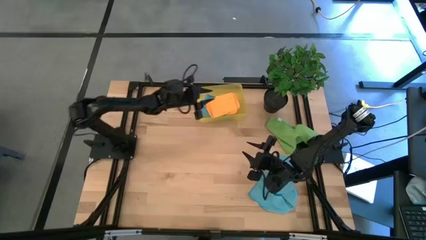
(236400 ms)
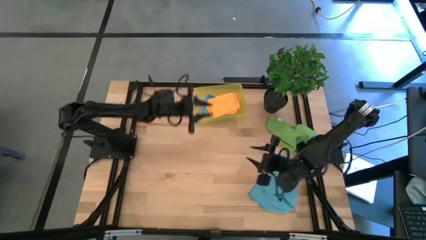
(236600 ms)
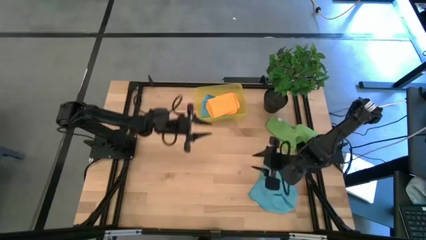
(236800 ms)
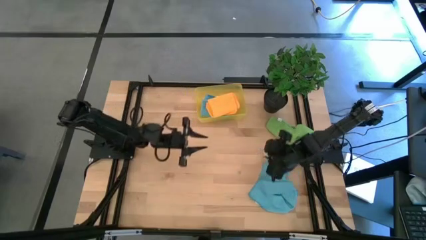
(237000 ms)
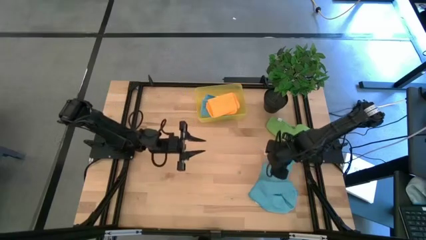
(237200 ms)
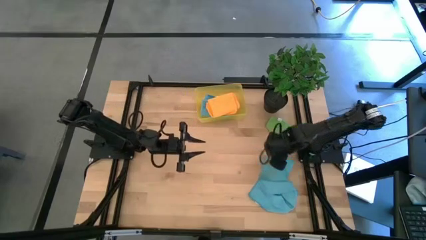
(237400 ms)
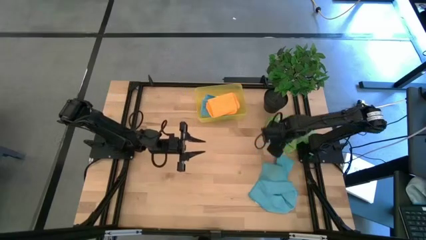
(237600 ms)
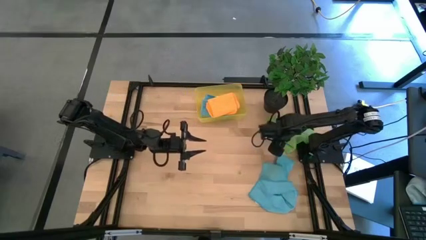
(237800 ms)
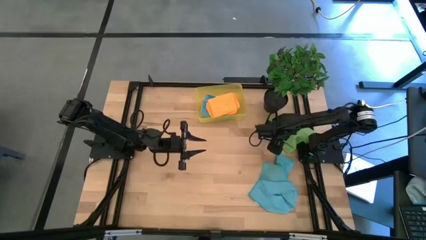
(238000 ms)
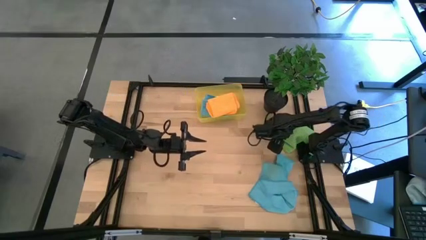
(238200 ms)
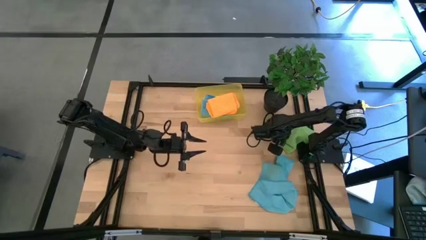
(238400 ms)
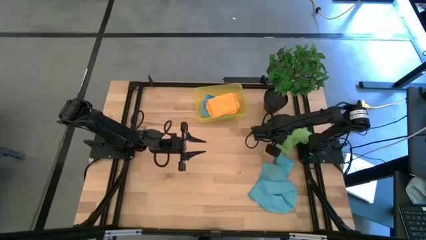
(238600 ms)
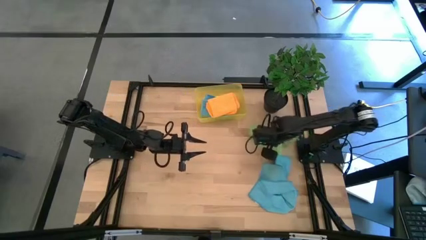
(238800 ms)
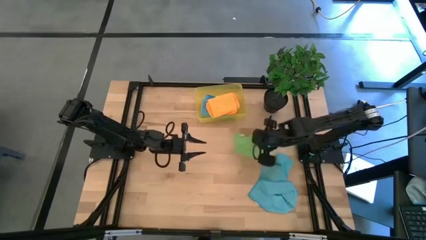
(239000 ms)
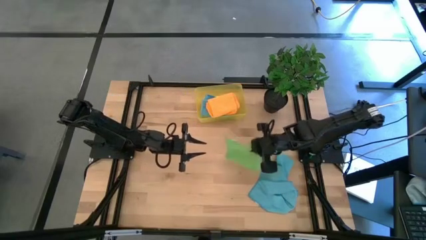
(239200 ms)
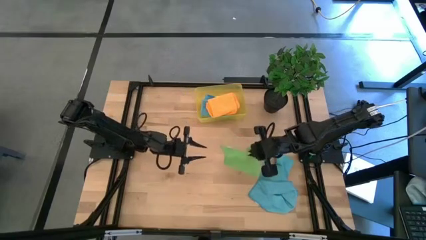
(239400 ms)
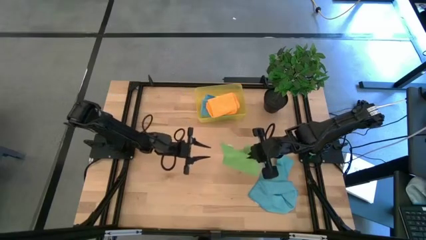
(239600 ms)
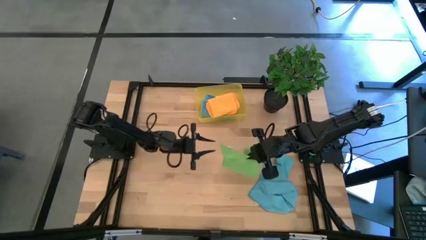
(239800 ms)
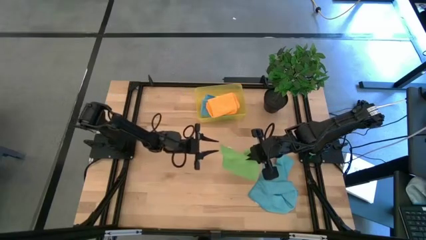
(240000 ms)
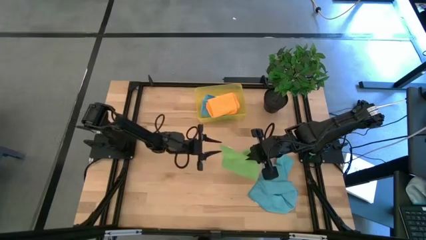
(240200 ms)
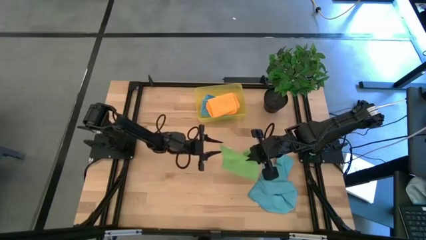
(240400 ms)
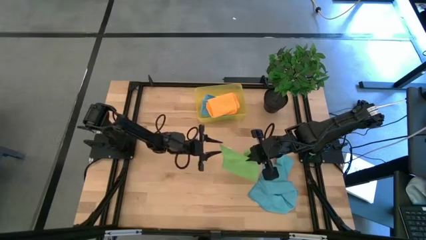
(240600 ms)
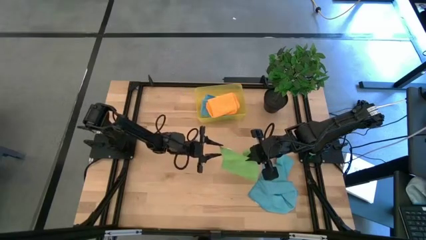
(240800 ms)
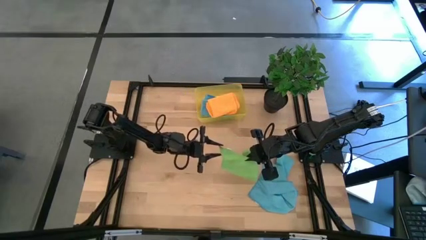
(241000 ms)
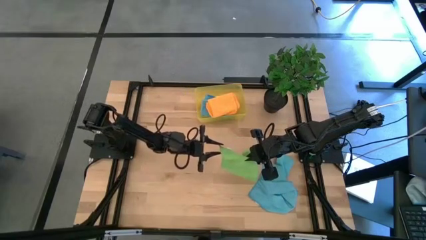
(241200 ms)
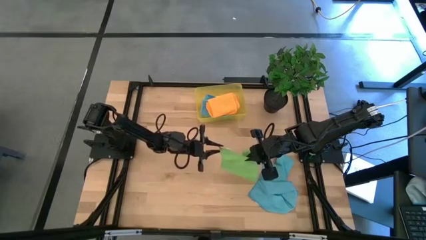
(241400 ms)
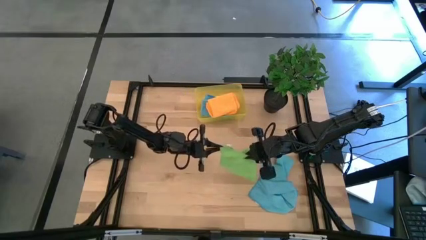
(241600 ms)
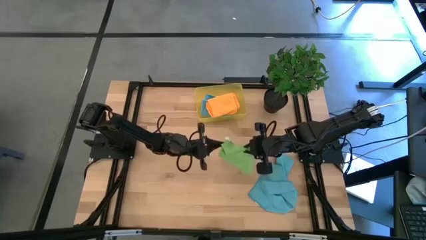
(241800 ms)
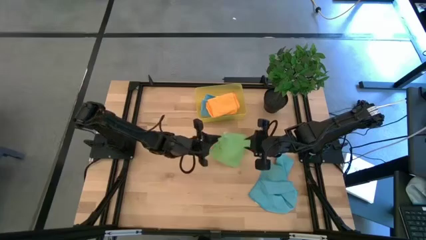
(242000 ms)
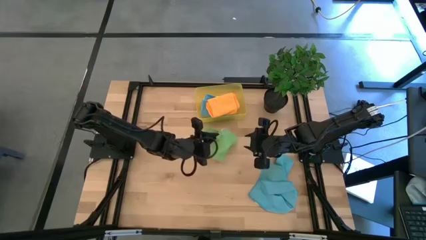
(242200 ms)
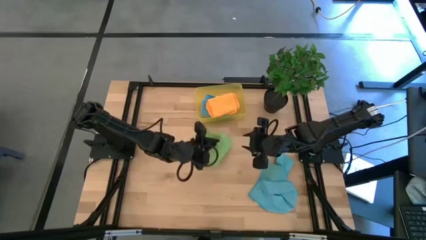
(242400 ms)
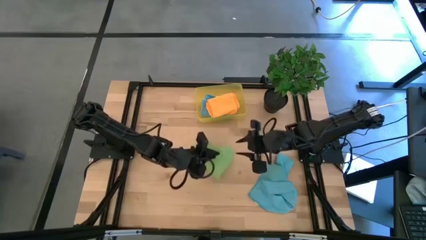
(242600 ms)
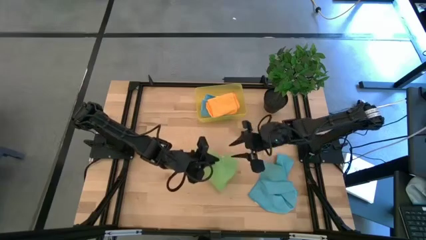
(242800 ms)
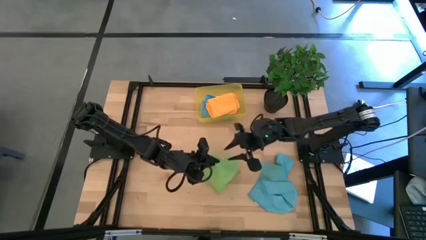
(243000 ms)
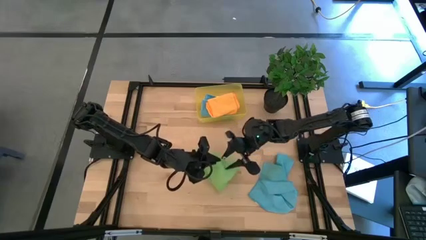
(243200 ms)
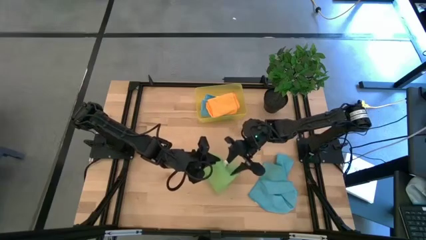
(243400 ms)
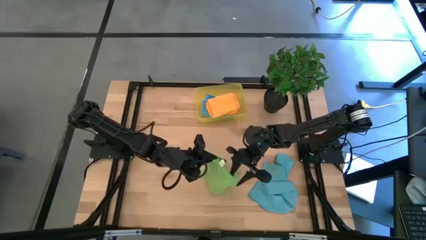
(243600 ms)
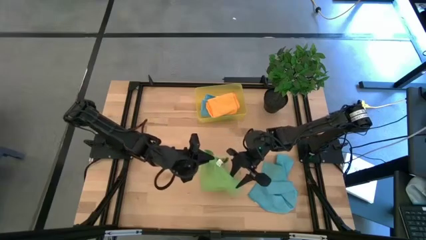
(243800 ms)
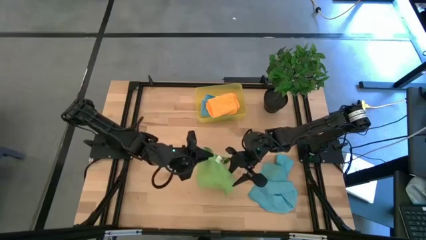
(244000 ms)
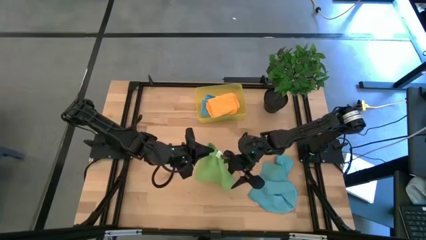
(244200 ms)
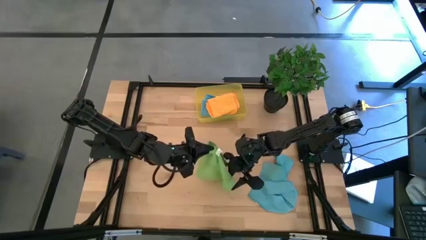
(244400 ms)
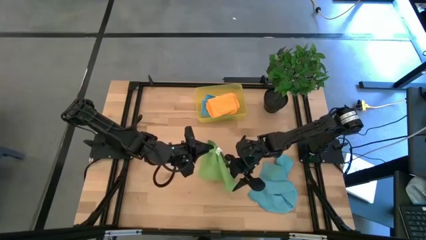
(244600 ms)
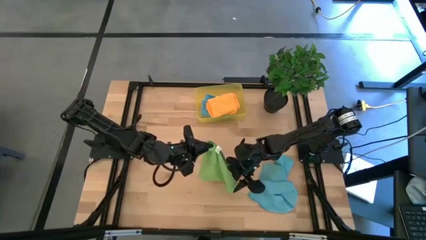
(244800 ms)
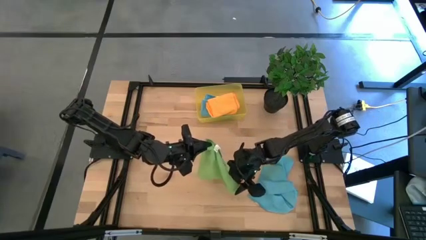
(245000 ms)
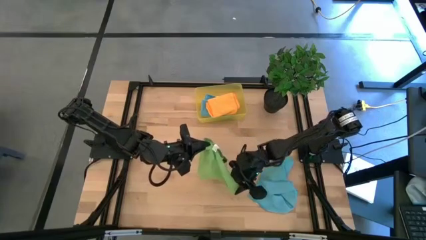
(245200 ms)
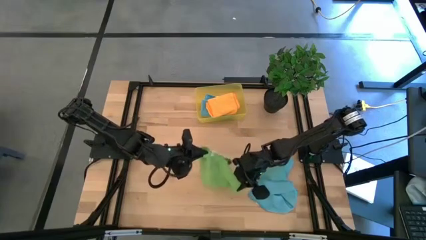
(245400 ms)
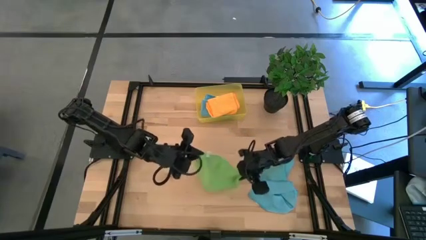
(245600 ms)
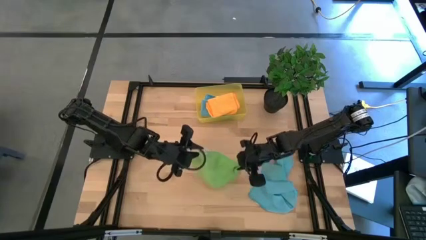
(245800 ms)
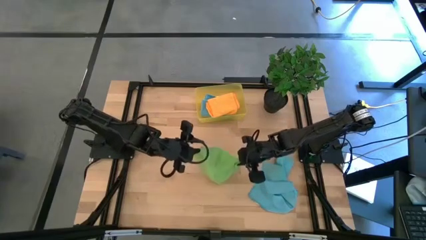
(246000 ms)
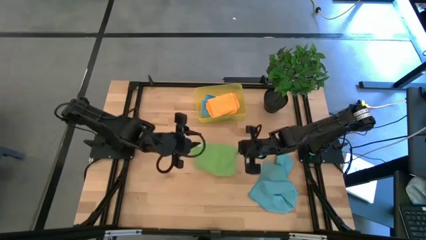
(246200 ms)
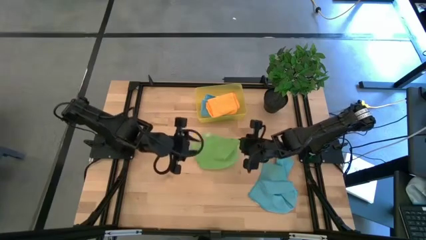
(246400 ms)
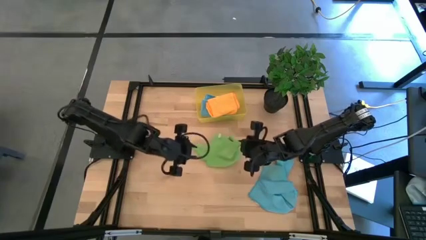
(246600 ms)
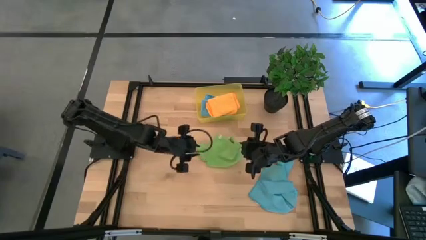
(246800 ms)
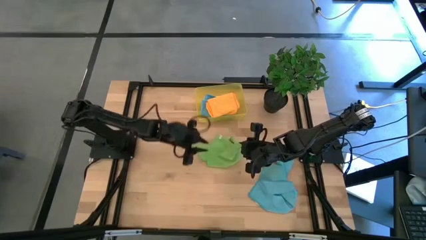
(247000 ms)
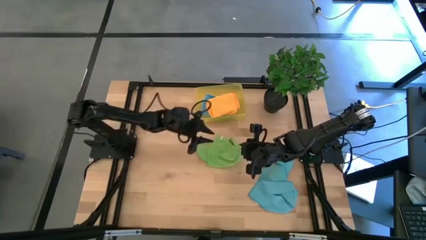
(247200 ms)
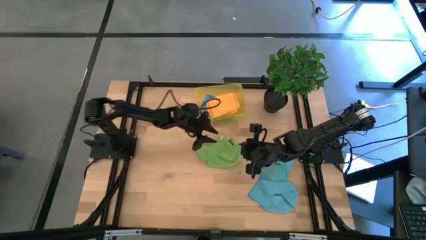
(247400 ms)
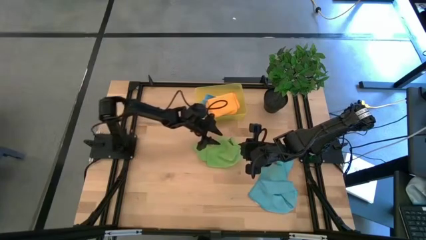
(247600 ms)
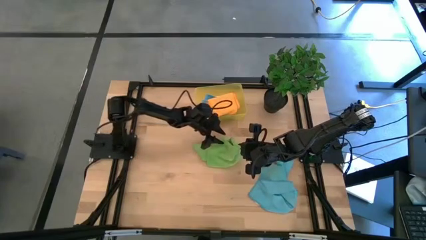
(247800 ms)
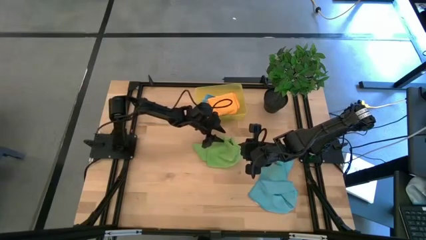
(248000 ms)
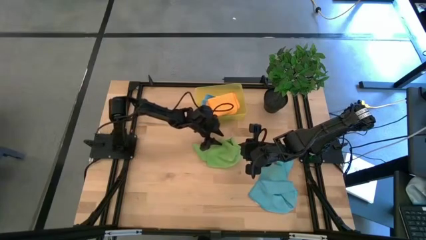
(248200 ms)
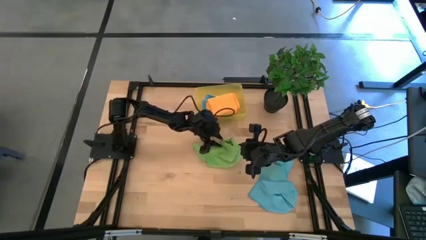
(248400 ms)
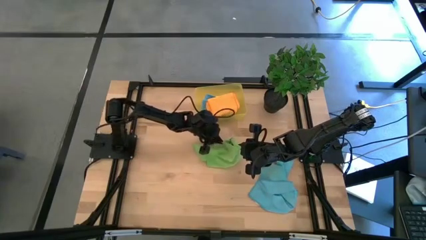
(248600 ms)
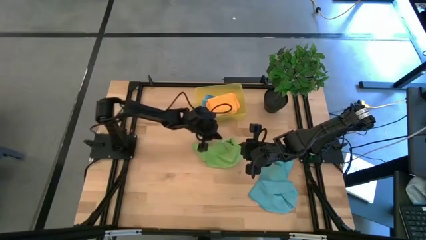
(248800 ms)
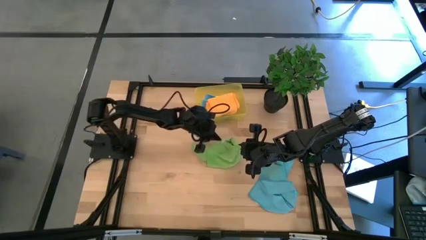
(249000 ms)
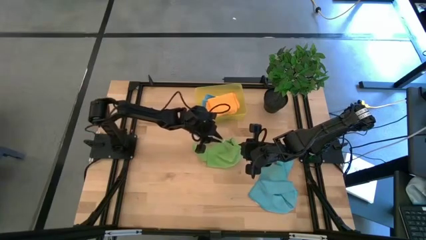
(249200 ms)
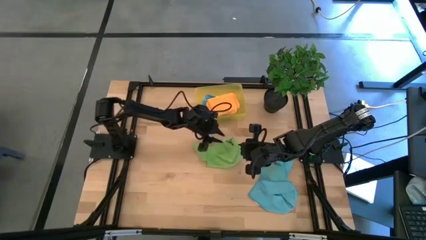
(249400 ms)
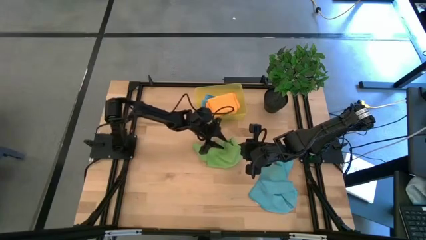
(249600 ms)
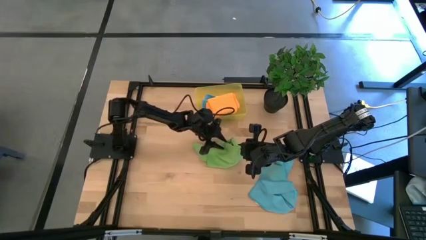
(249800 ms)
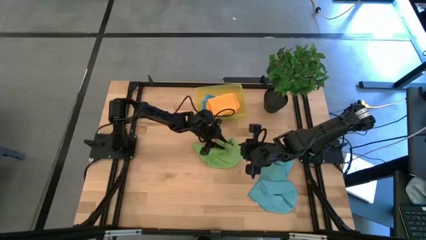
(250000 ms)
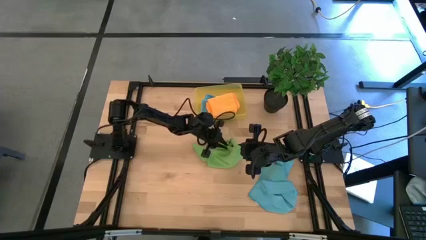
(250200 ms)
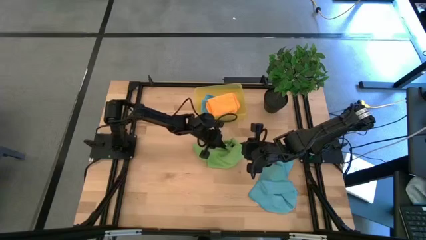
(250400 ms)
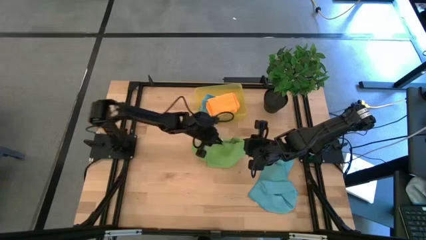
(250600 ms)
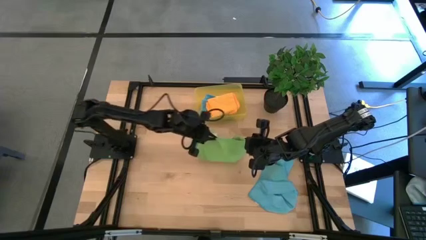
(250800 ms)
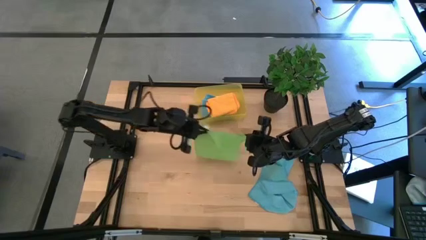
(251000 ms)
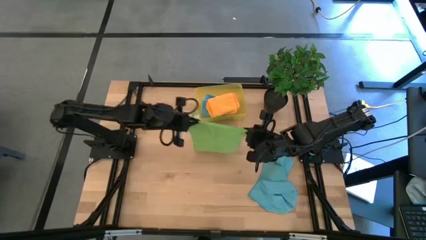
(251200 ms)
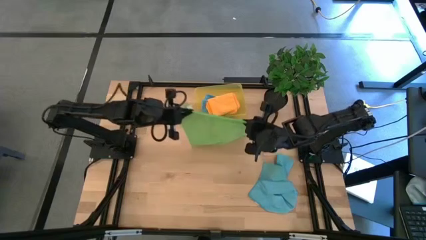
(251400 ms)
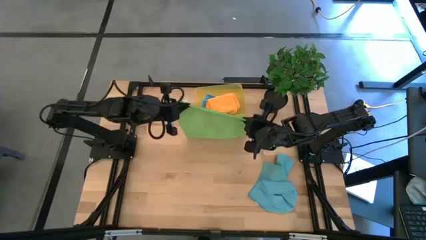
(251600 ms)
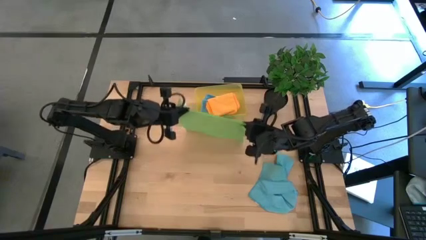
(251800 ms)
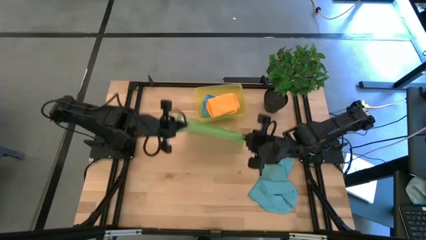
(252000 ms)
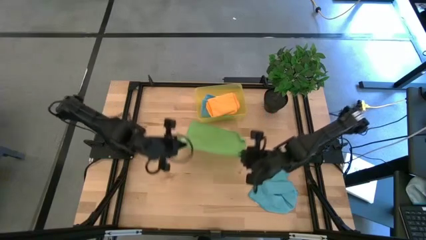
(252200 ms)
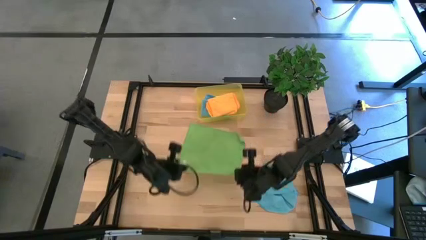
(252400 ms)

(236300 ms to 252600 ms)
Task: Fold microfiber towels
Fold the green microfiber towel
